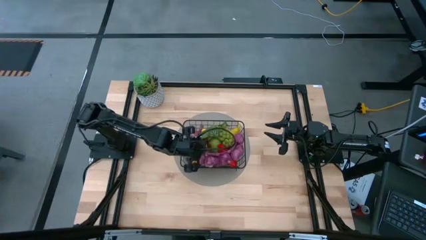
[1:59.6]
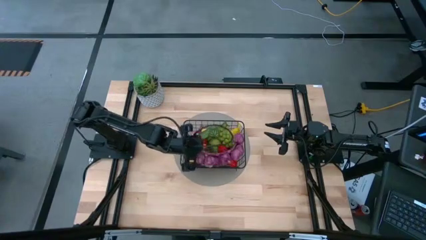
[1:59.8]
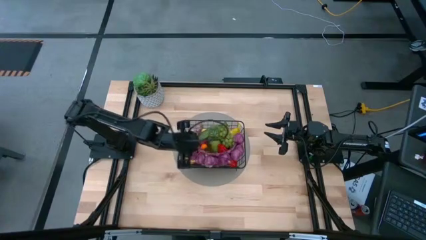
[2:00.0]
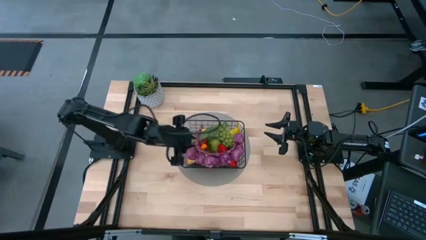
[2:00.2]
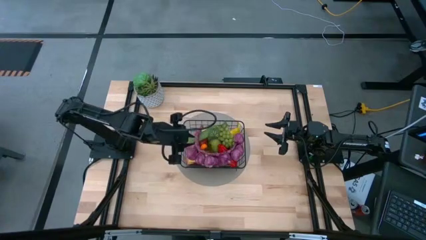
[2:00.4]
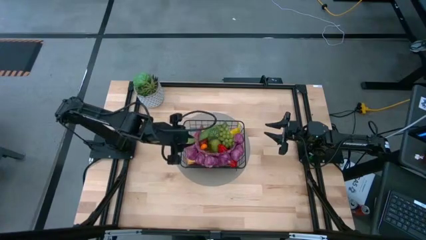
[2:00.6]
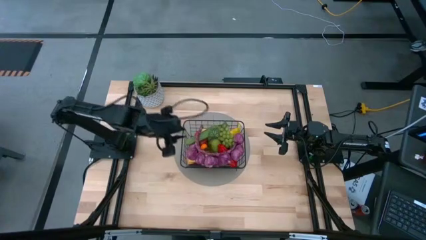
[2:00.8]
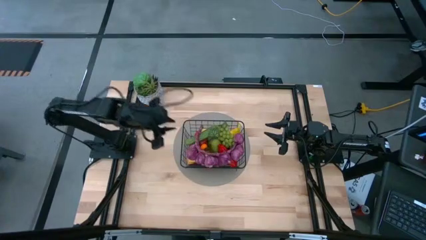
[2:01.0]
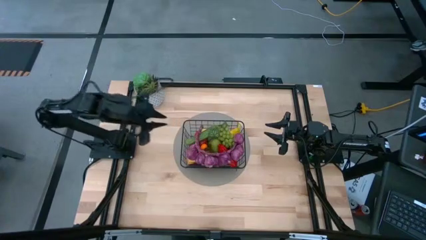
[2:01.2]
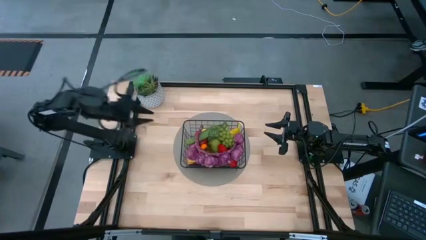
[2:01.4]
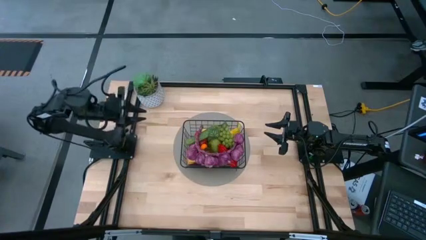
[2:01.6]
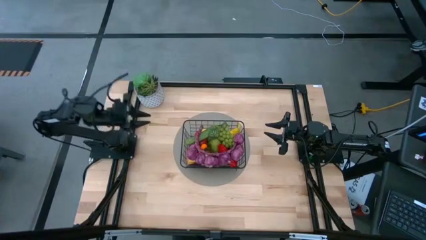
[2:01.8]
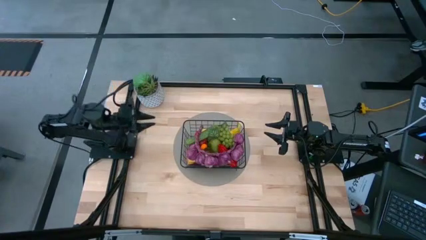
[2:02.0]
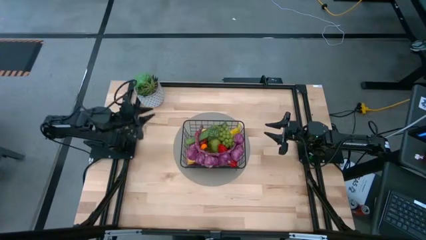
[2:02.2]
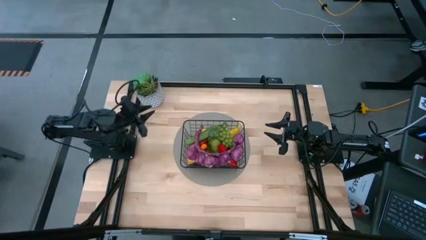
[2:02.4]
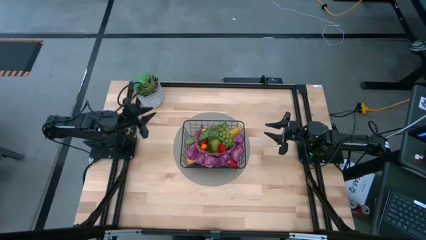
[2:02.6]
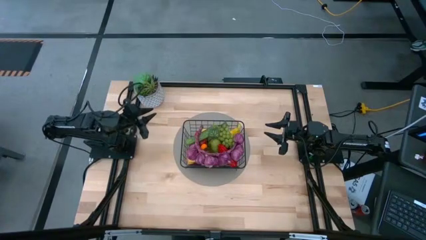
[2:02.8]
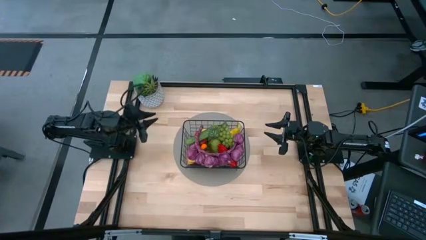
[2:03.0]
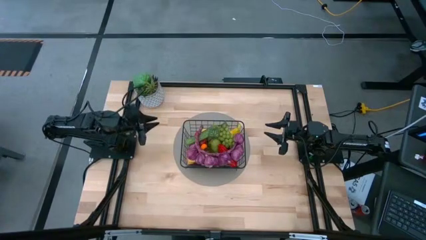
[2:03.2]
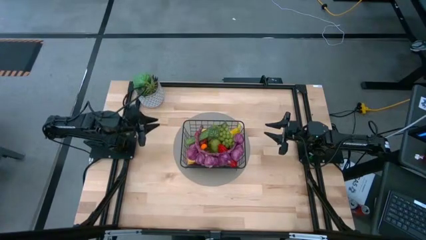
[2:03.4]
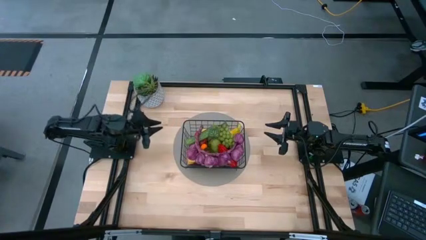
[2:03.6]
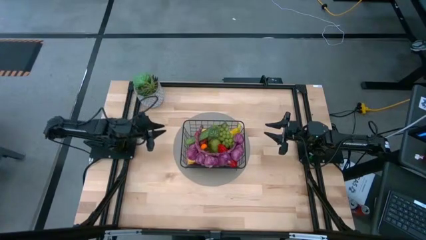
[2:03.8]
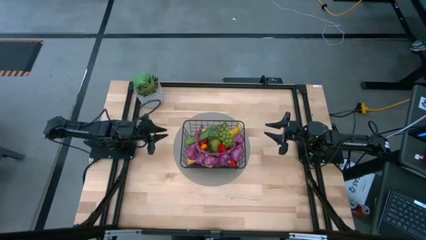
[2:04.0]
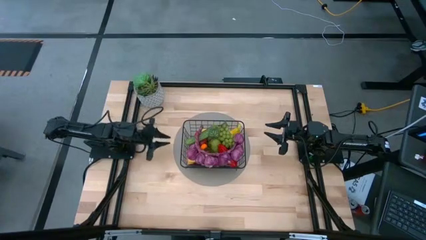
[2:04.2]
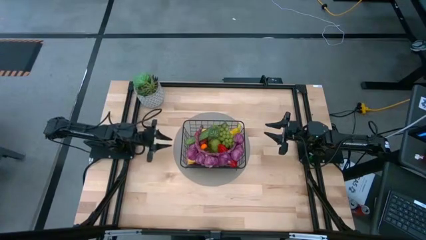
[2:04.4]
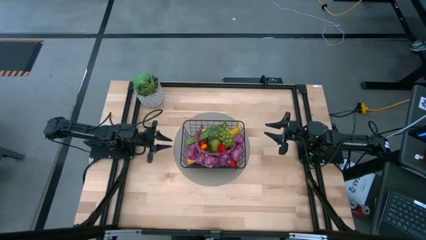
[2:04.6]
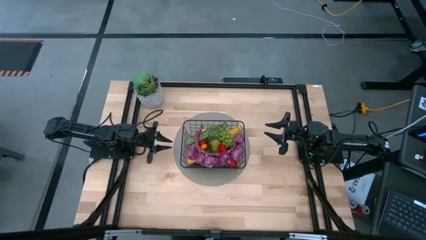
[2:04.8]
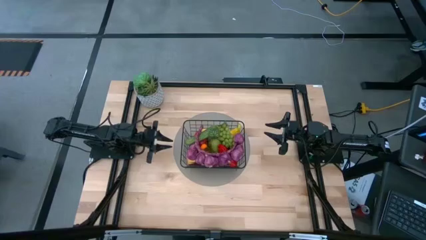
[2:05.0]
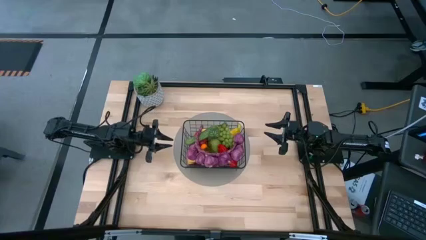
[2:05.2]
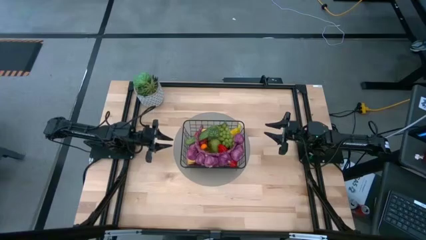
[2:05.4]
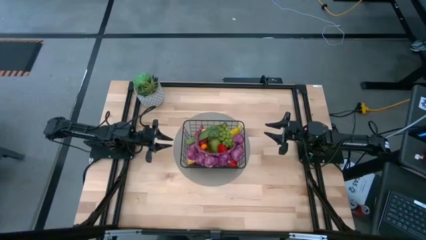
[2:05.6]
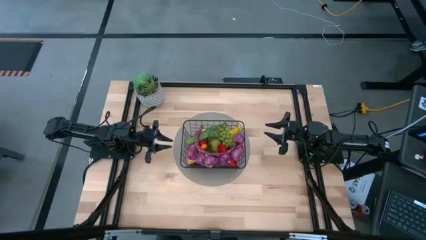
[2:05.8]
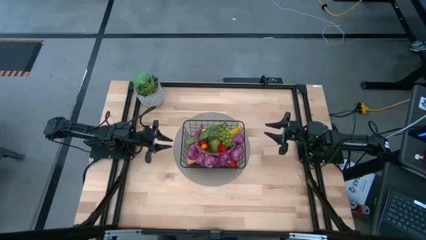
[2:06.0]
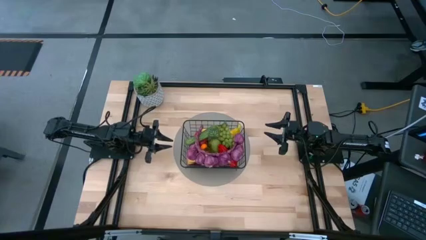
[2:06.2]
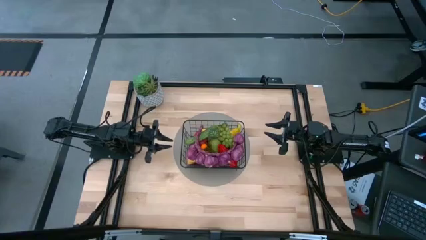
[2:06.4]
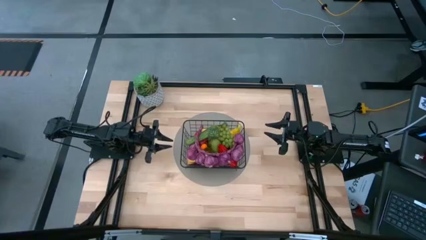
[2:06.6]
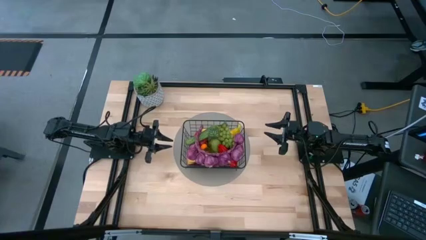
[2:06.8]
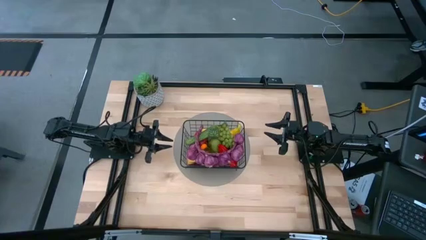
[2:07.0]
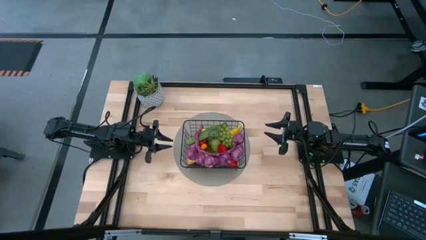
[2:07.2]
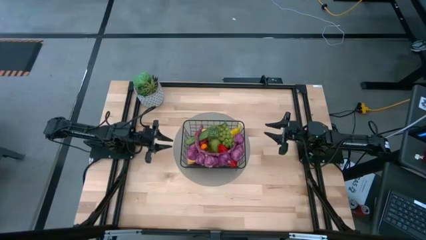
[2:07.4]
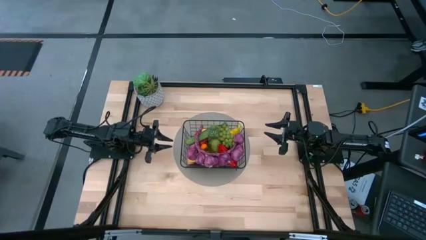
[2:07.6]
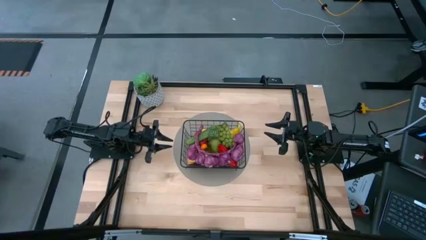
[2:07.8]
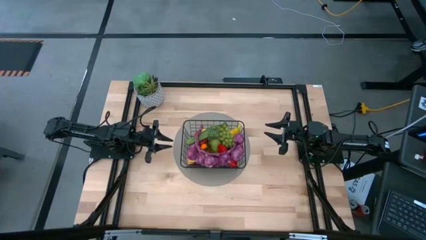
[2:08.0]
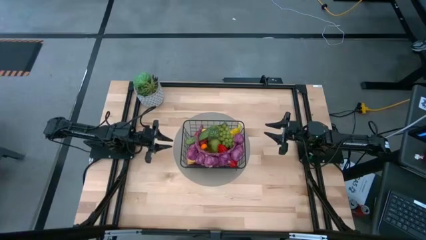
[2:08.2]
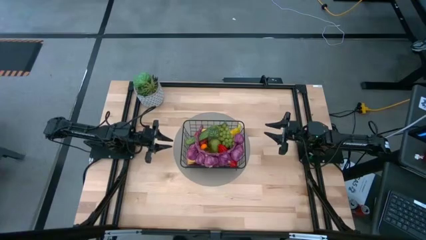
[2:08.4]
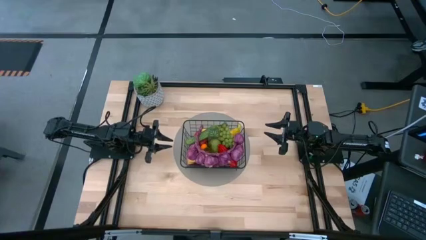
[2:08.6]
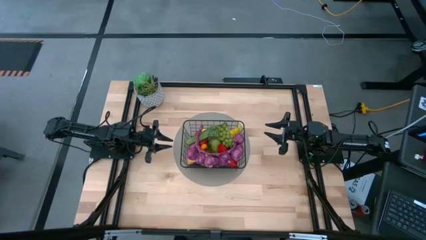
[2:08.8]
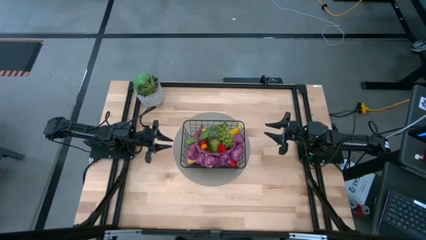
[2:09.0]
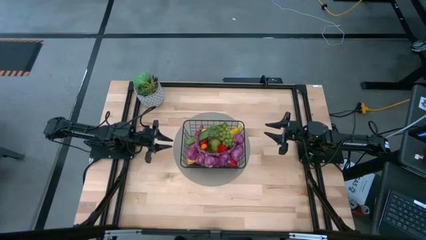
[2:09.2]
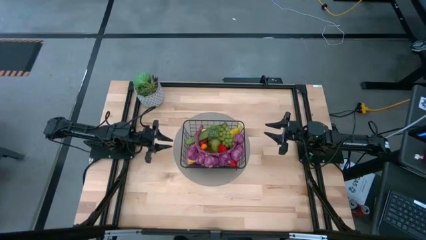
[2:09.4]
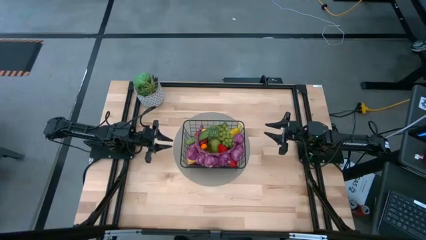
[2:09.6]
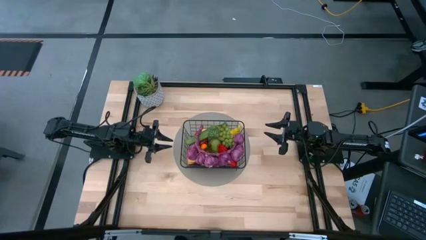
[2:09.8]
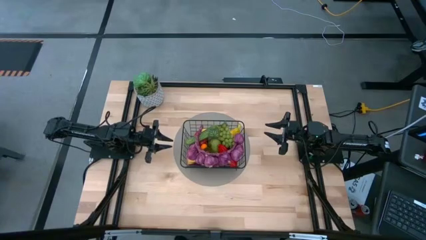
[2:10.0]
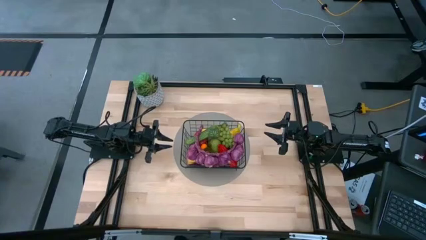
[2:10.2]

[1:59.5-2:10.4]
Task: Build produce basket
Return to Home Position

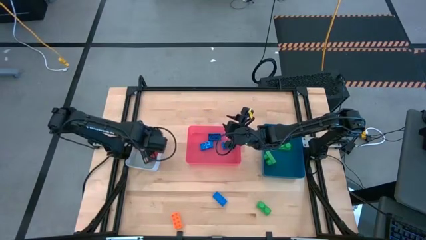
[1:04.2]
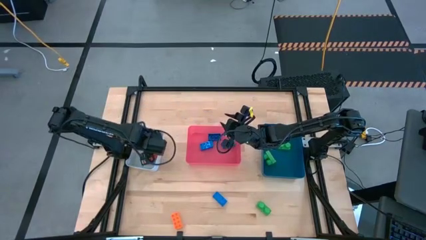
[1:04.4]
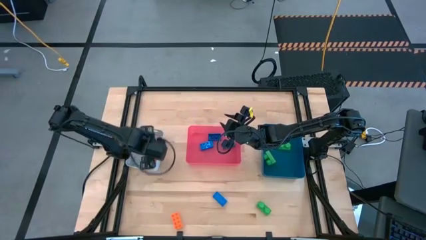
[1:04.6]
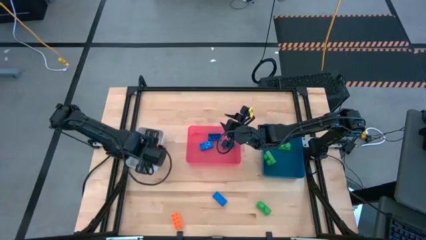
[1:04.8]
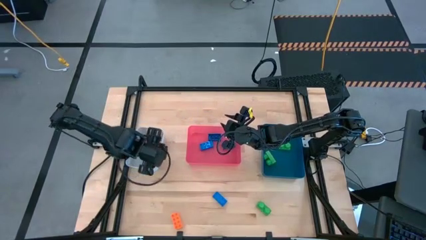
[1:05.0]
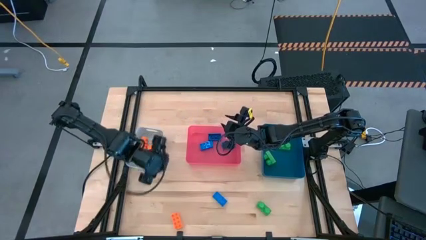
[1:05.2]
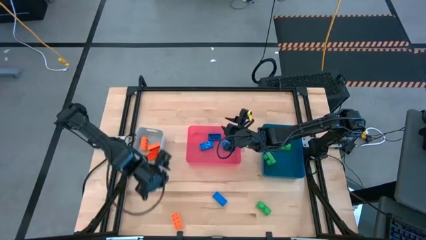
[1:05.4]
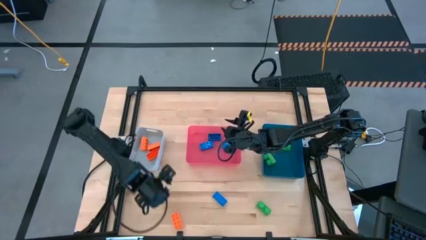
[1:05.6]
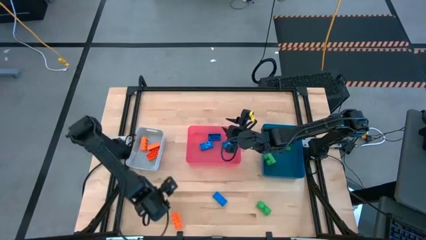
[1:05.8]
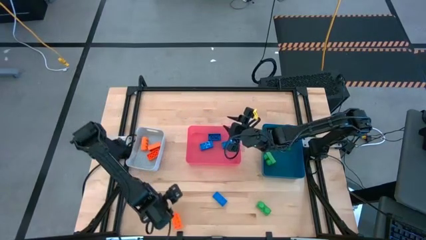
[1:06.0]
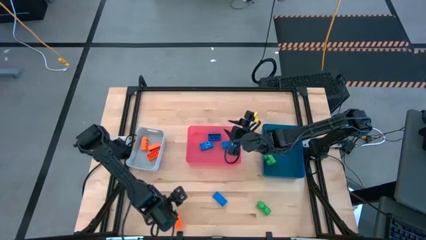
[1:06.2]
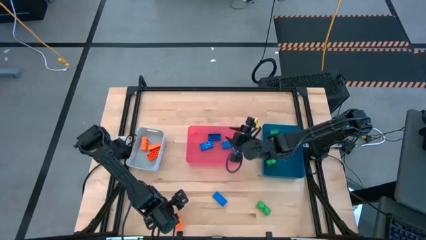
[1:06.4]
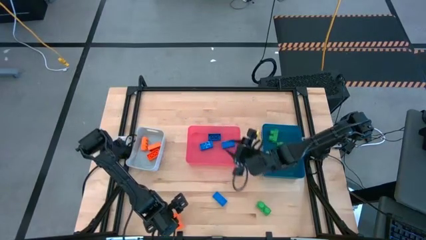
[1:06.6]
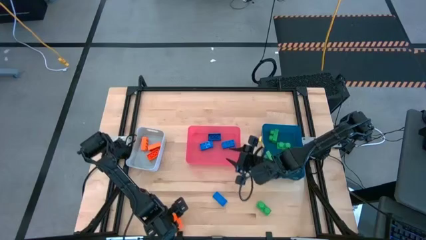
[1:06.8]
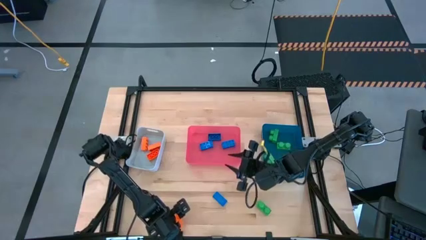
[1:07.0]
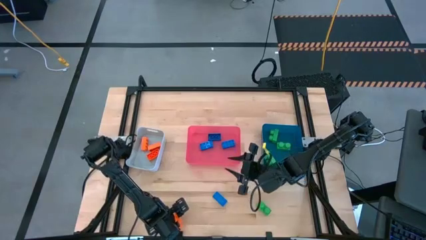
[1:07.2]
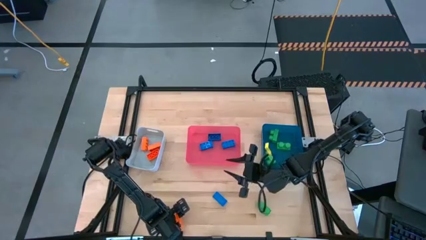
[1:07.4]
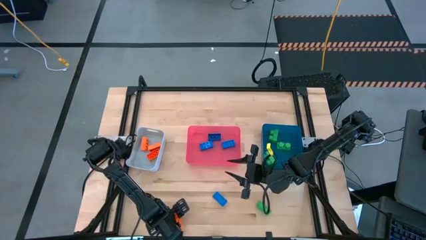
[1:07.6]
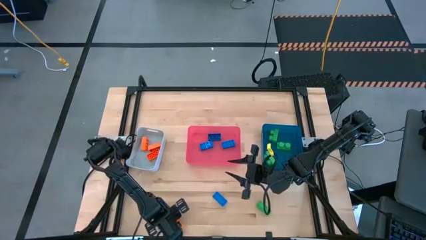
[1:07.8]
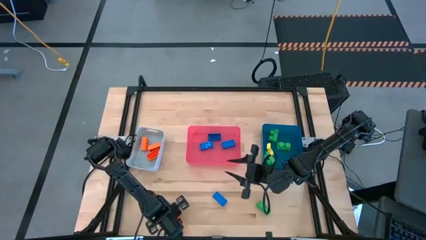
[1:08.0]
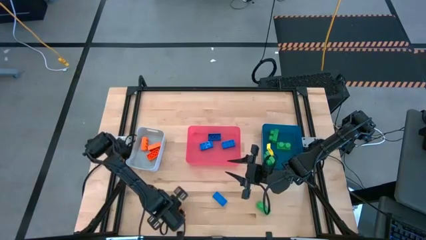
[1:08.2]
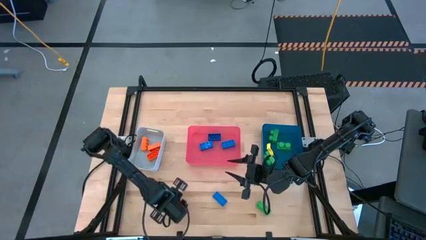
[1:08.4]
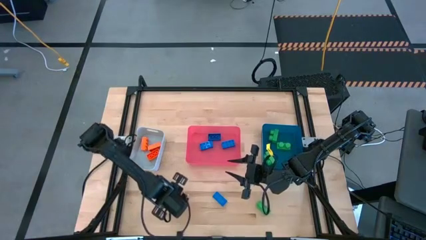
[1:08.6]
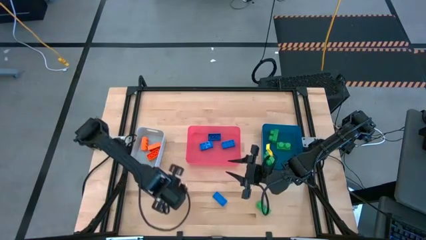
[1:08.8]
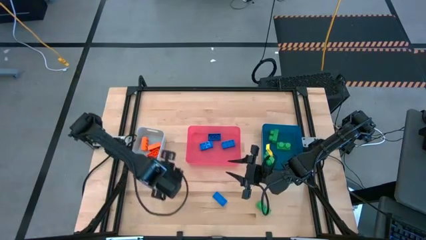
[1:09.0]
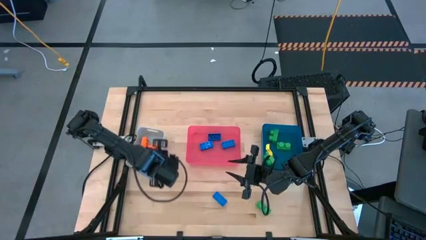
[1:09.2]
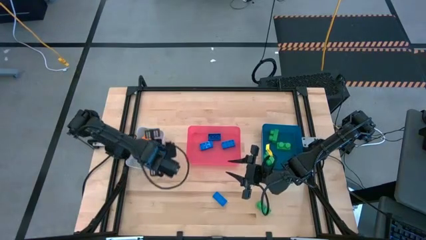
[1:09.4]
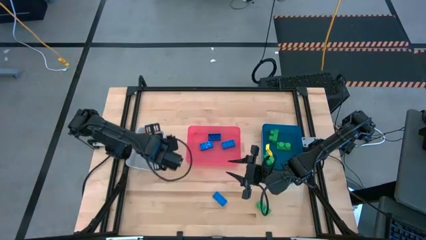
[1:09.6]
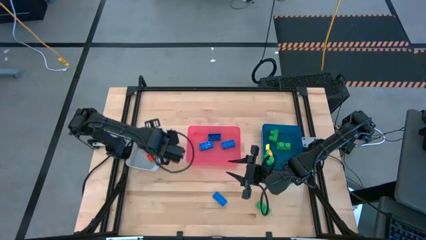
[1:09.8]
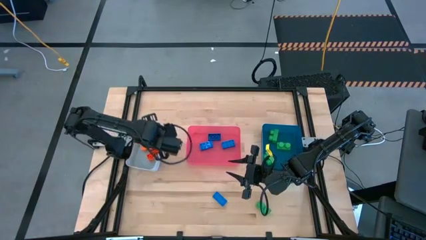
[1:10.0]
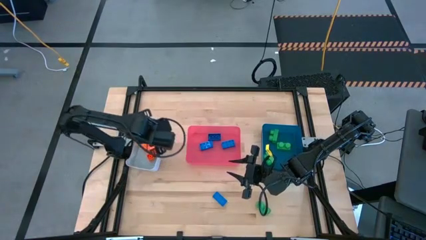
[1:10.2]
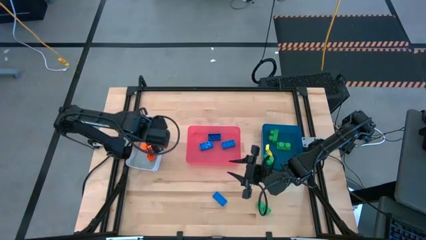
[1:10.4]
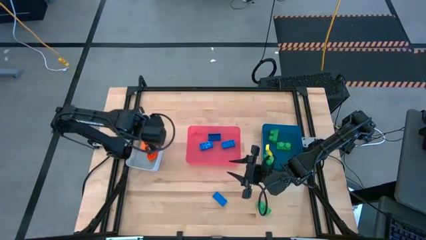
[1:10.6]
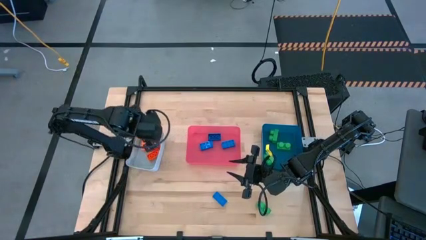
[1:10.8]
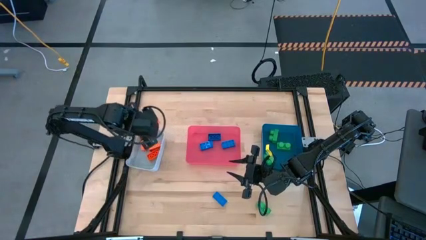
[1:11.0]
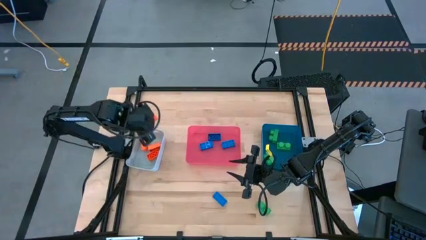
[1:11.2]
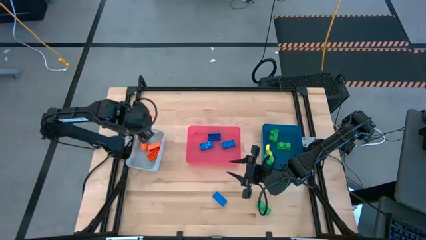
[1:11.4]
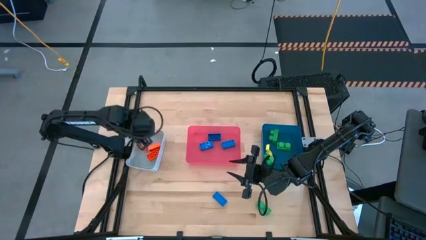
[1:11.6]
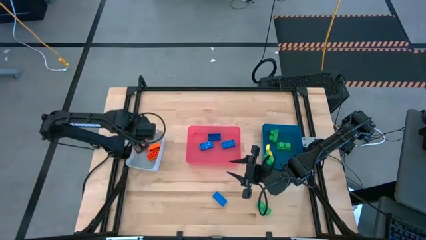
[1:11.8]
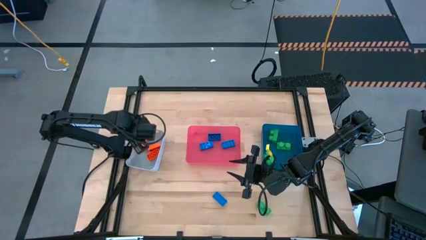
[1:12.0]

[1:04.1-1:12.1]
Task: Sort & place blocks by color
Put the orange game piece into the gray bin
